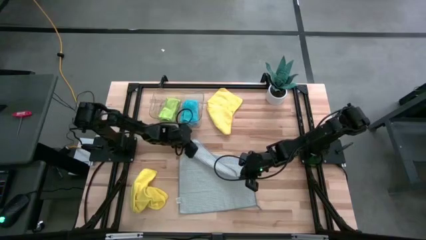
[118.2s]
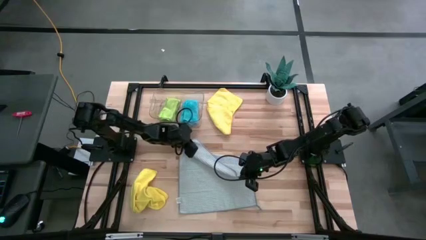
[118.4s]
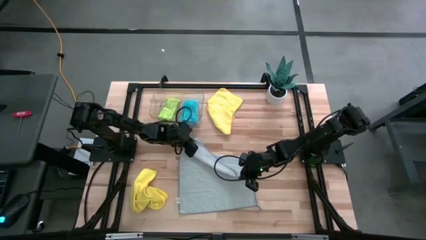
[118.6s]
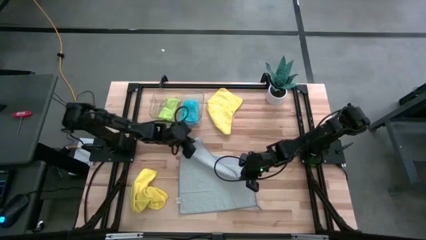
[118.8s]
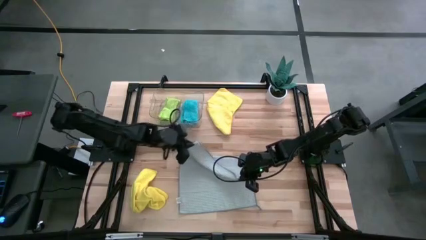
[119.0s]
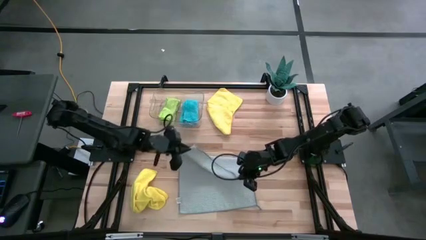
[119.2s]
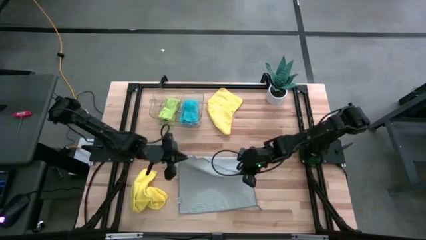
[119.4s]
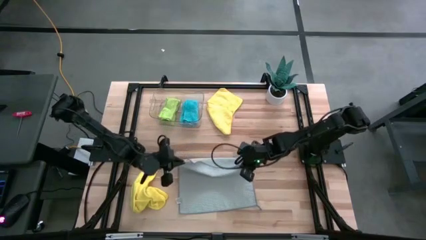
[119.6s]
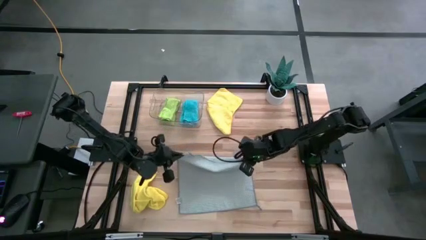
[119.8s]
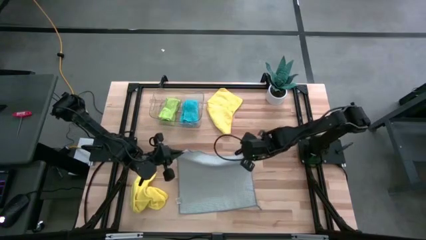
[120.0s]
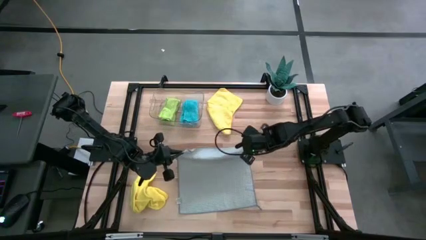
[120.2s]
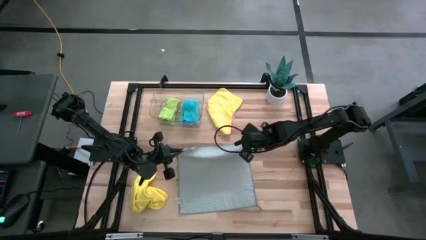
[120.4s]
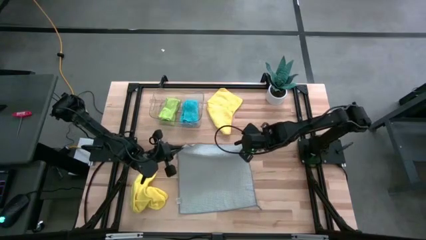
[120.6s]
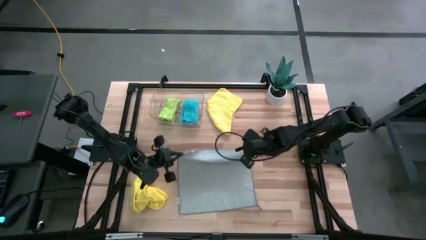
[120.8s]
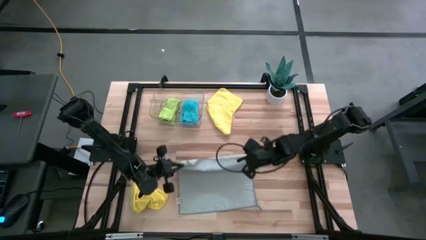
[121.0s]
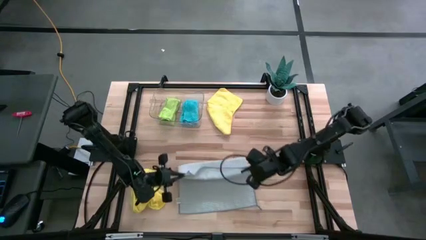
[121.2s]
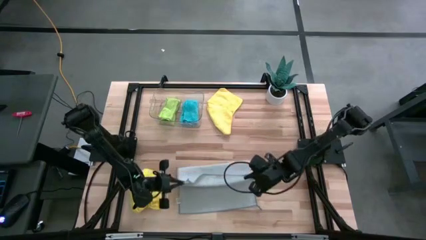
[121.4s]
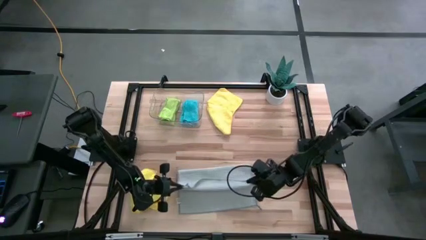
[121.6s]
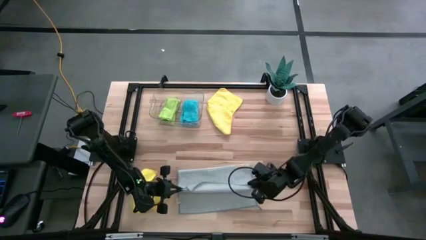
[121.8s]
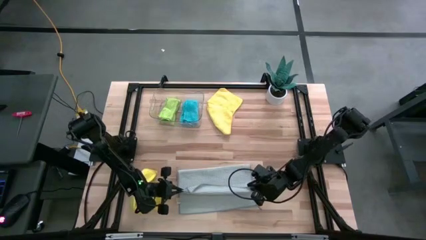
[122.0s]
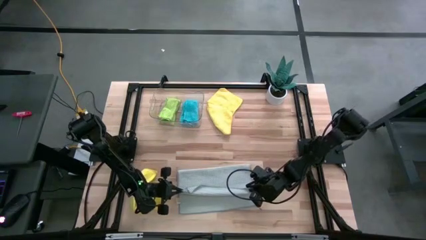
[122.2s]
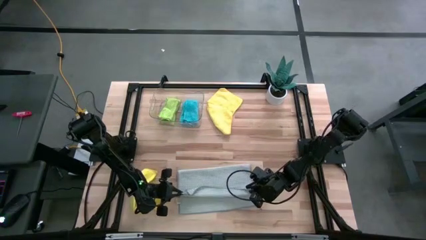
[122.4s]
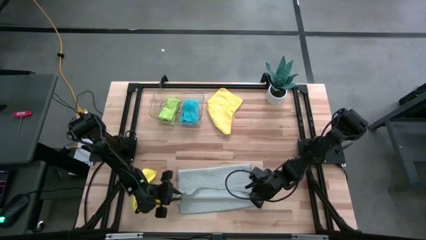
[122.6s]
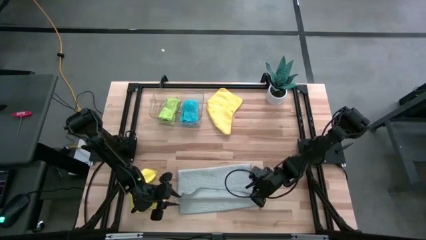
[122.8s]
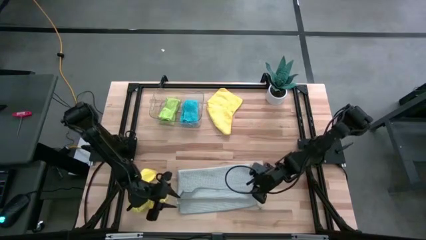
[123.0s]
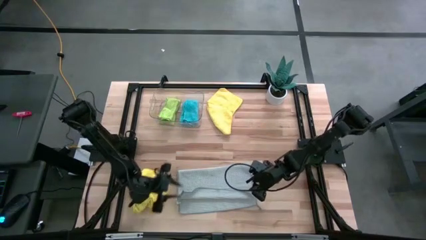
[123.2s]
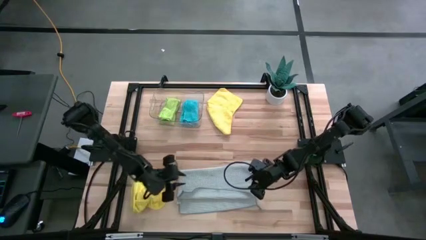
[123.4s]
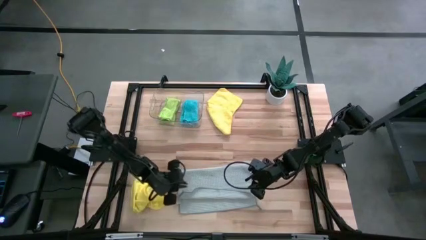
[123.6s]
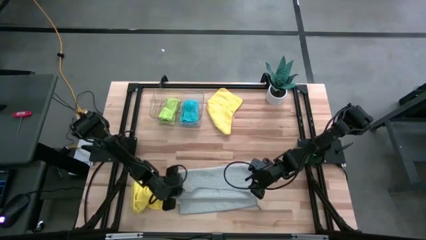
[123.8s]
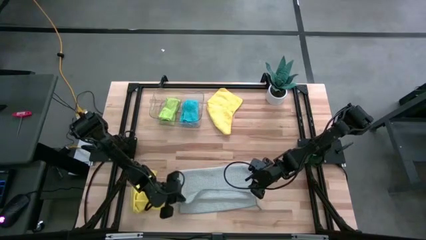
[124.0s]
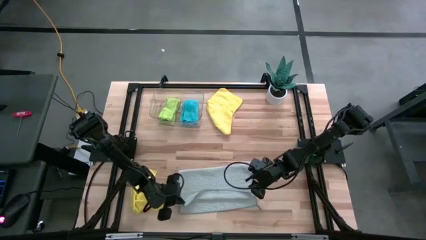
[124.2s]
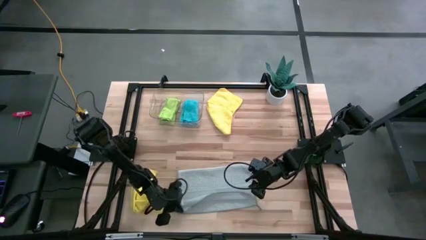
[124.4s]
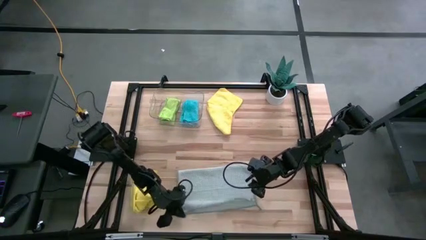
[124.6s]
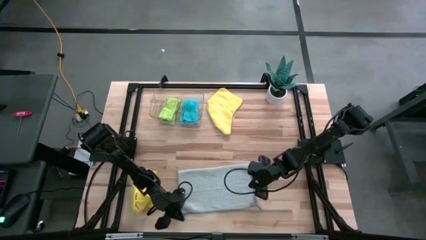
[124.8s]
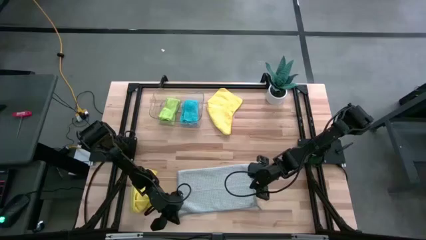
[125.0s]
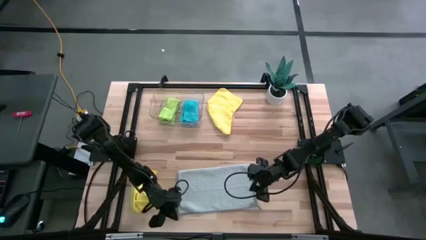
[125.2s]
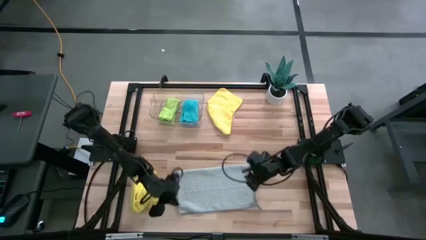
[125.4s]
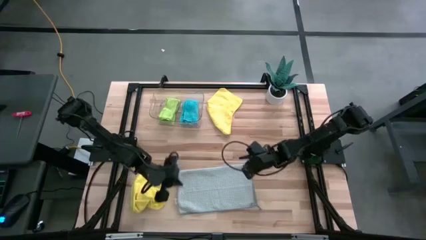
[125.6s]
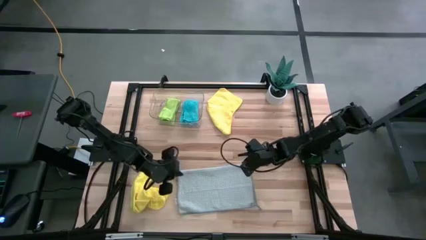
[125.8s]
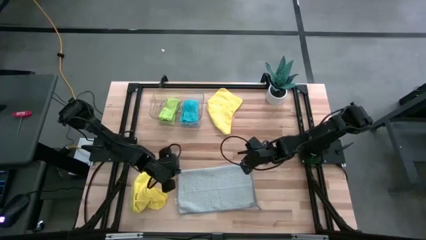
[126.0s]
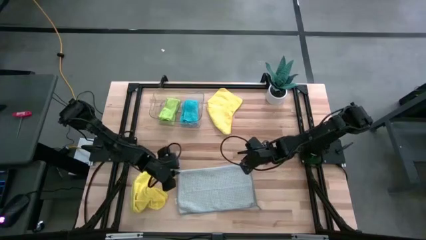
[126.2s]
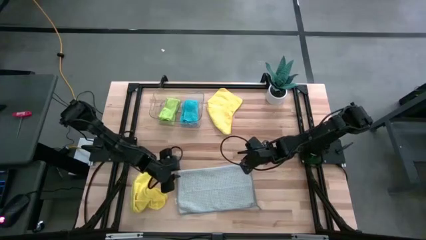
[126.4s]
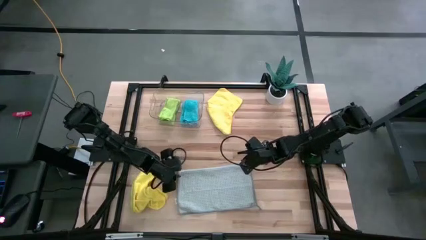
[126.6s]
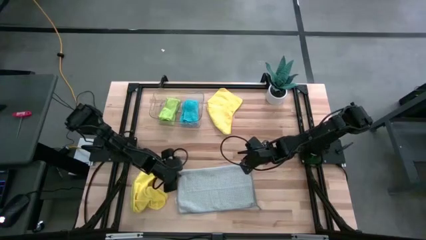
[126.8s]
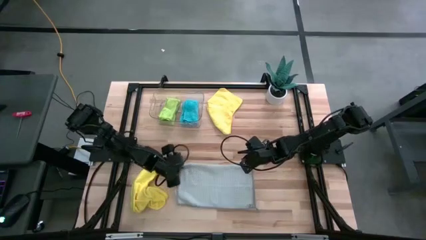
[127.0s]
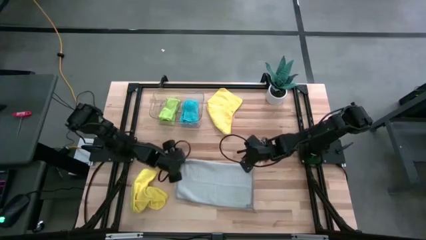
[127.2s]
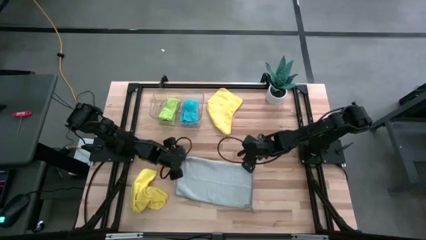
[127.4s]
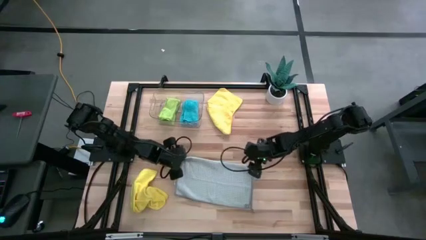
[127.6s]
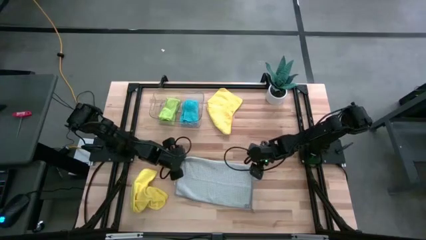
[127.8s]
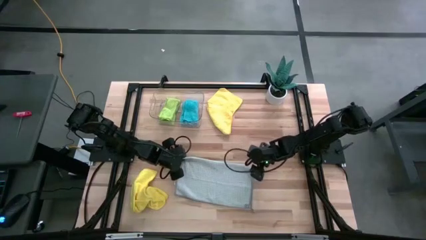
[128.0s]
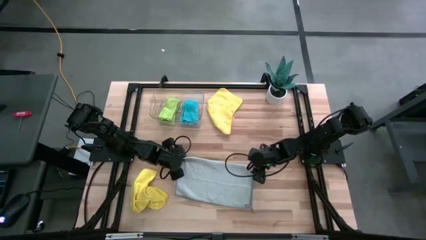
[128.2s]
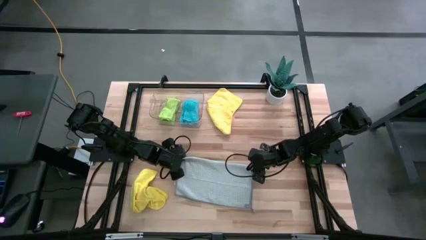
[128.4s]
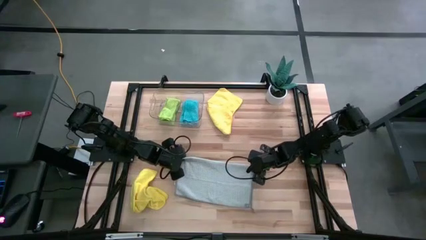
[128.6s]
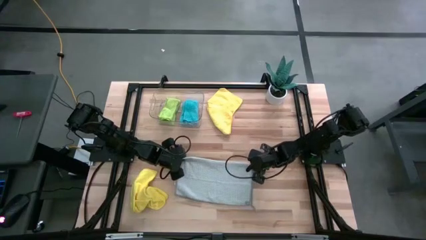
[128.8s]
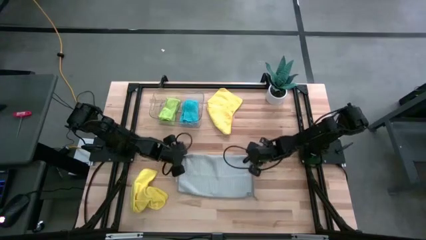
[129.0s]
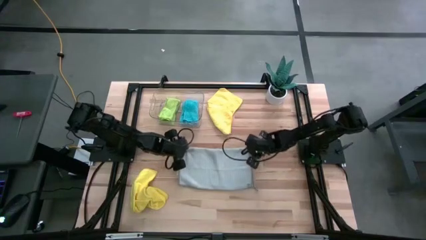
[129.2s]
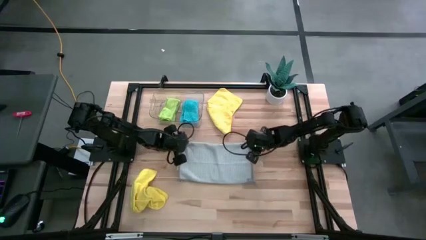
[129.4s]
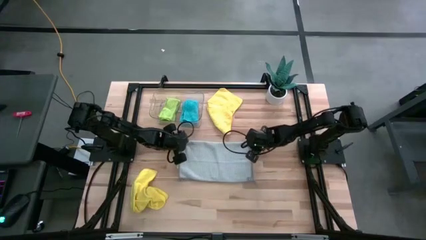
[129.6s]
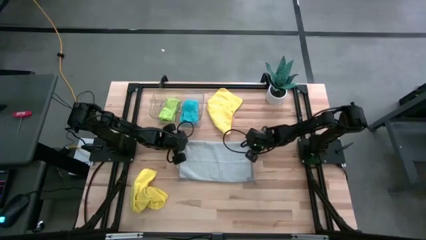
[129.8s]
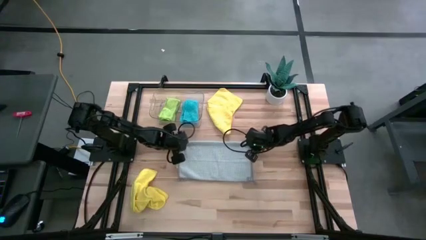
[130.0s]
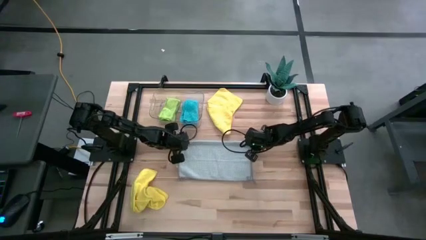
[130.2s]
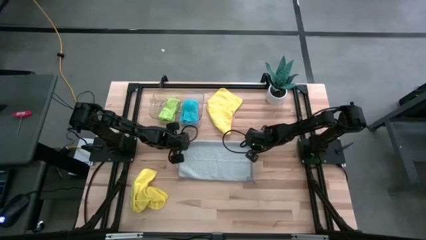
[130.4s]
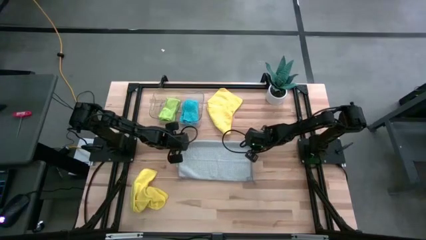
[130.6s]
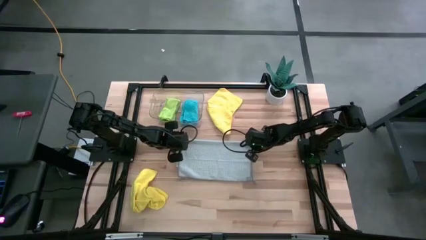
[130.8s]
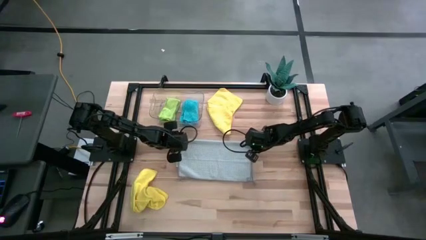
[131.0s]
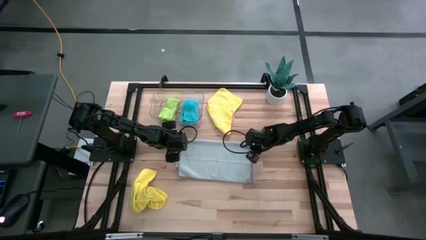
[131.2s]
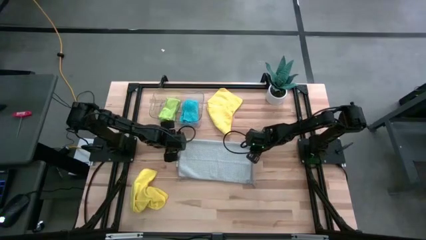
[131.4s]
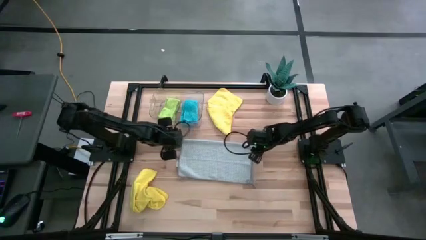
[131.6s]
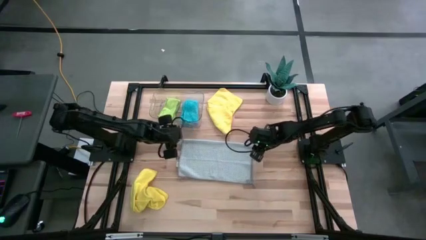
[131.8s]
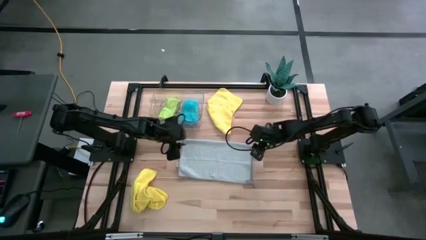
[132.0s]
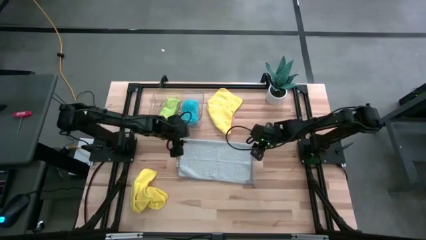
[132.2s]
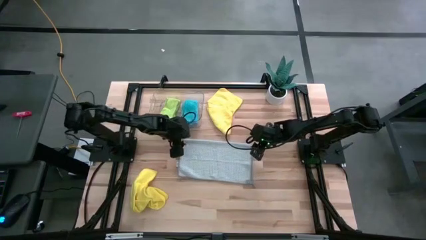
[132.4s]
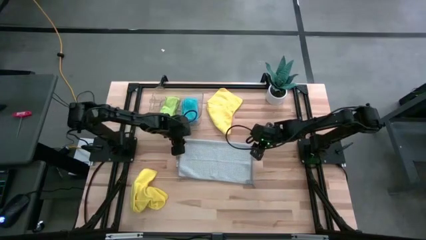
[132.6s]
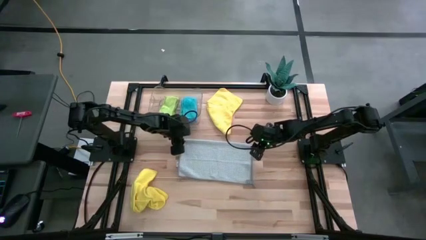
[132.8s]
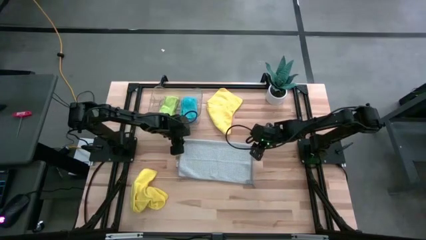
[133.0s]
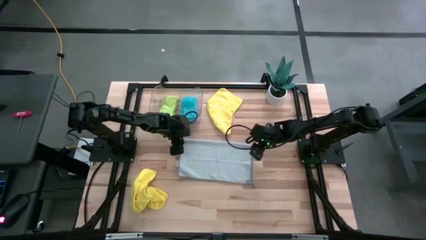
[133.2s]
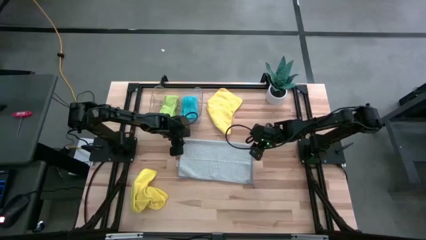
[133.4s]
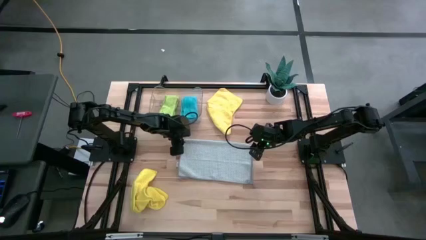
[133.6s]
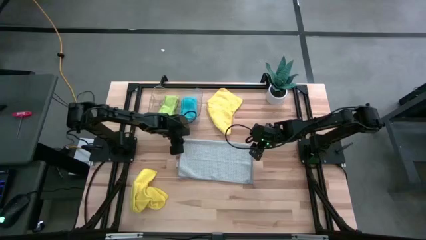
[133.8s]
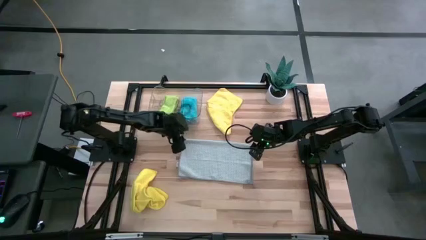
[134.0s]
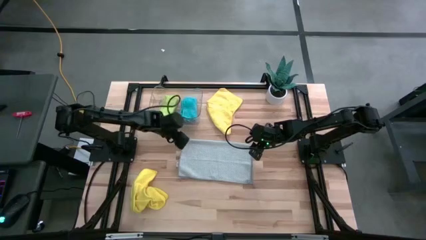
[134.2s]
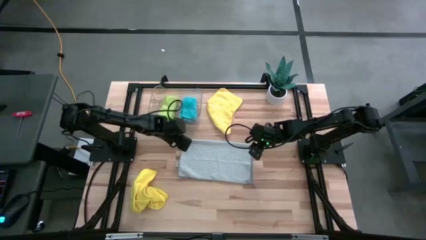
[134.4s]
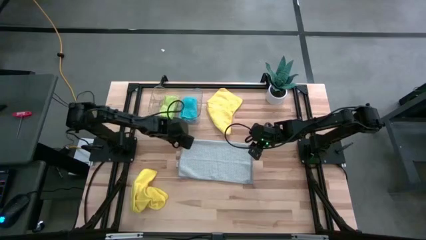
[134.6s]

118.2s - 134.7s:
Task: Fold microfiber towels
Fold the gray towel
